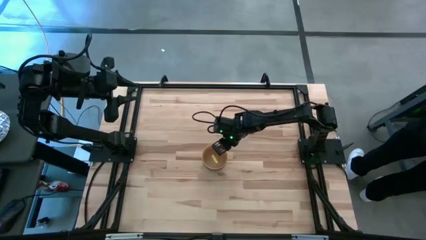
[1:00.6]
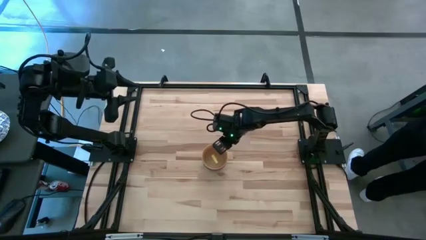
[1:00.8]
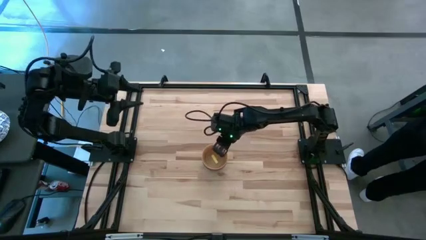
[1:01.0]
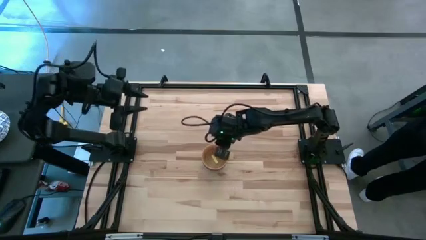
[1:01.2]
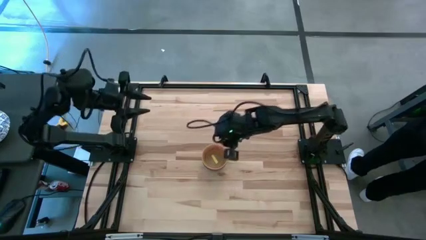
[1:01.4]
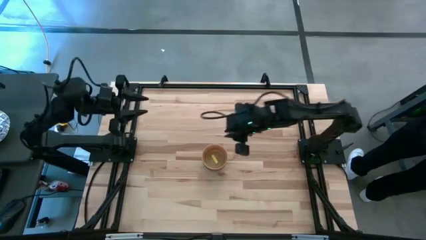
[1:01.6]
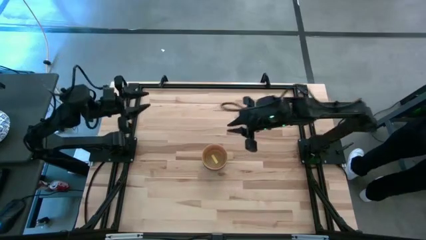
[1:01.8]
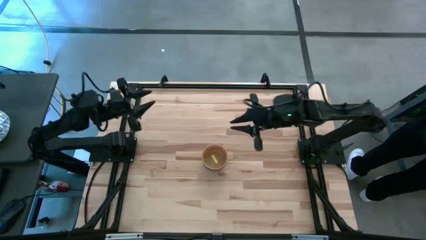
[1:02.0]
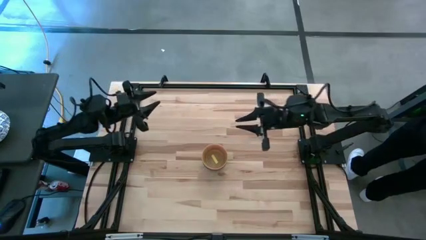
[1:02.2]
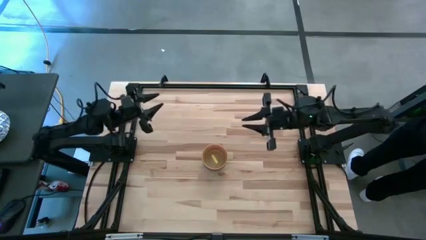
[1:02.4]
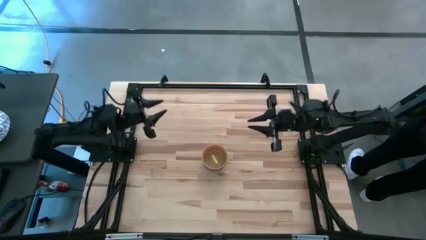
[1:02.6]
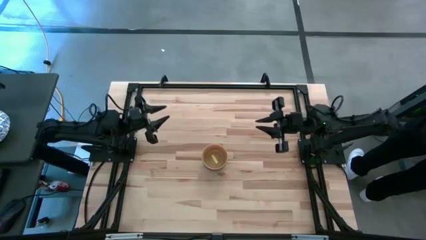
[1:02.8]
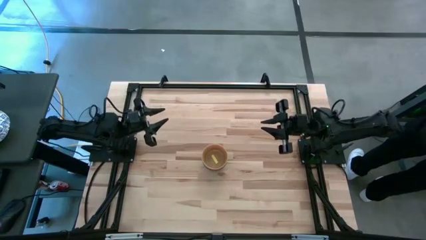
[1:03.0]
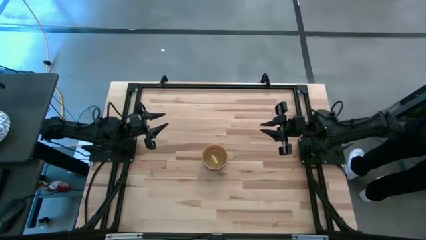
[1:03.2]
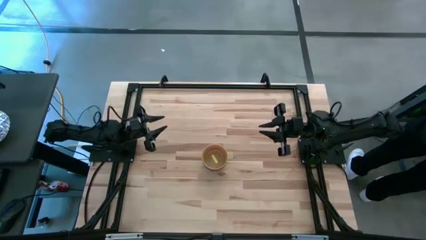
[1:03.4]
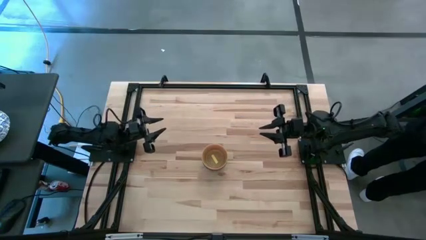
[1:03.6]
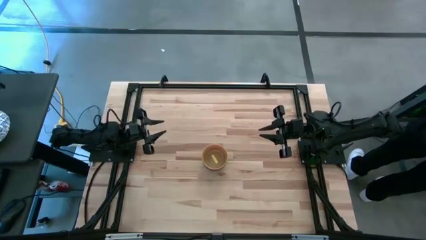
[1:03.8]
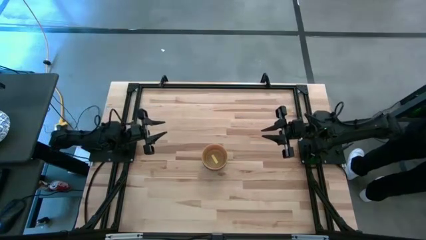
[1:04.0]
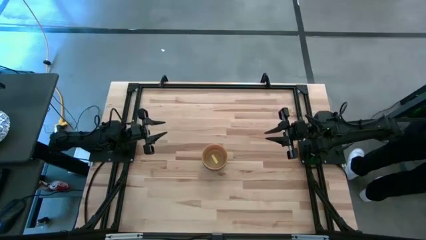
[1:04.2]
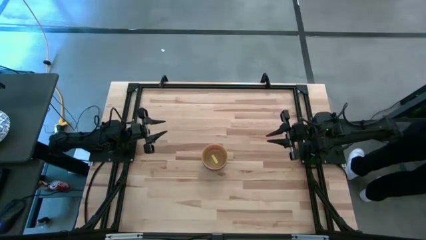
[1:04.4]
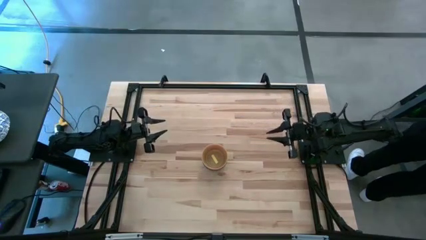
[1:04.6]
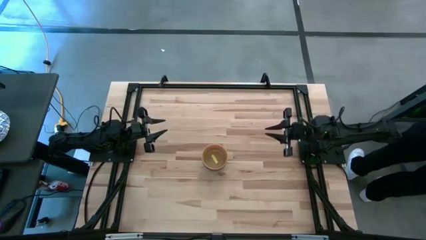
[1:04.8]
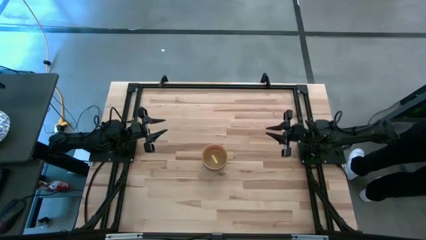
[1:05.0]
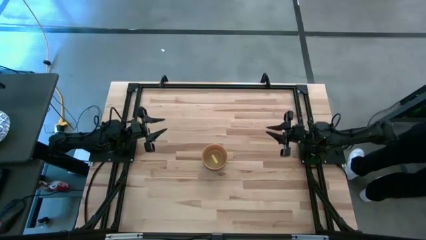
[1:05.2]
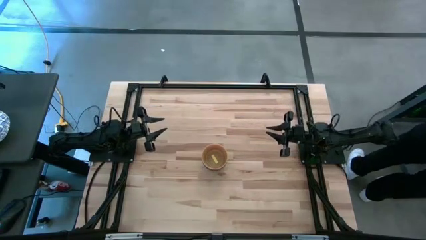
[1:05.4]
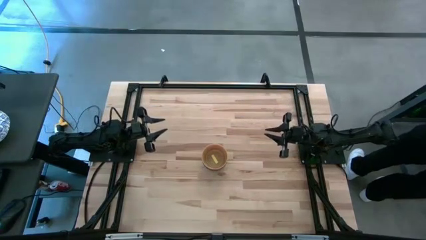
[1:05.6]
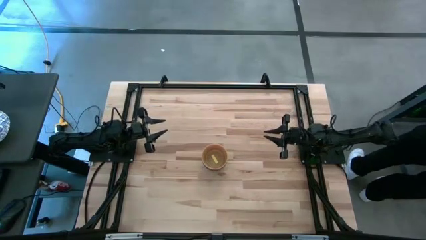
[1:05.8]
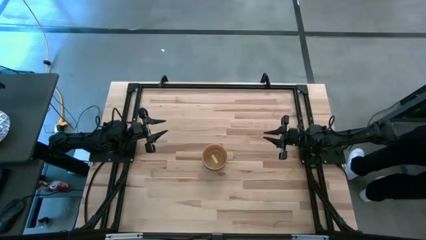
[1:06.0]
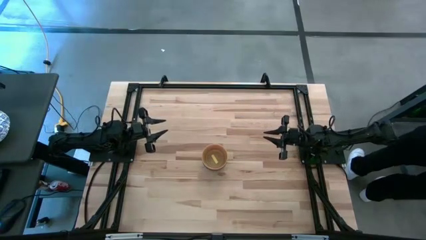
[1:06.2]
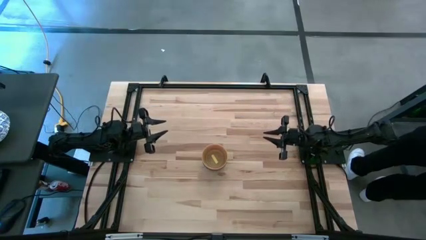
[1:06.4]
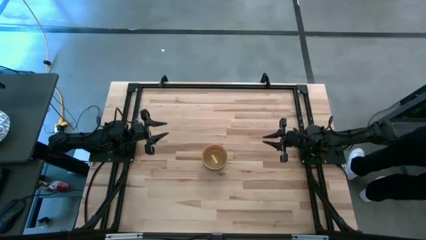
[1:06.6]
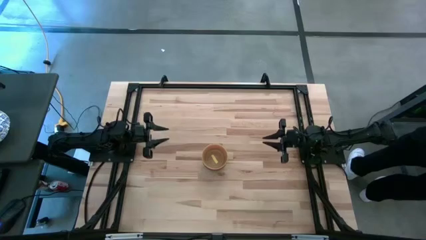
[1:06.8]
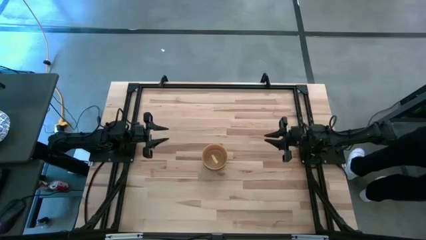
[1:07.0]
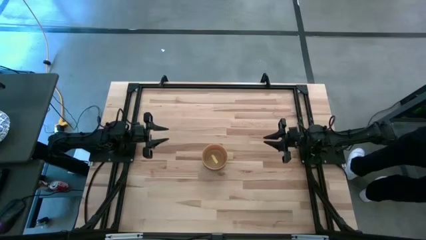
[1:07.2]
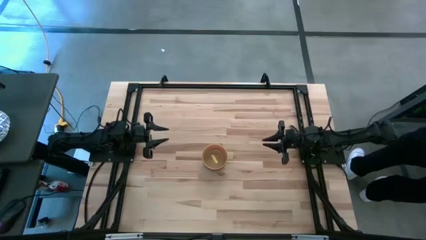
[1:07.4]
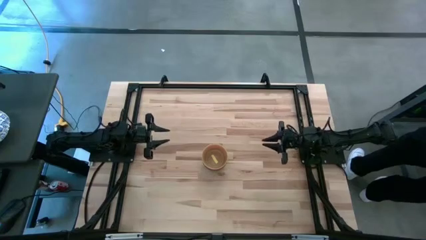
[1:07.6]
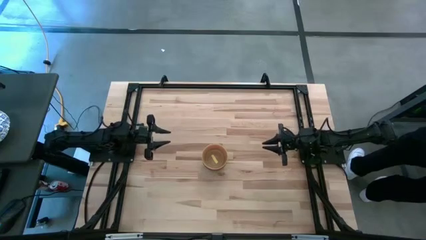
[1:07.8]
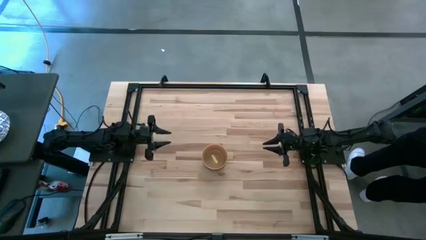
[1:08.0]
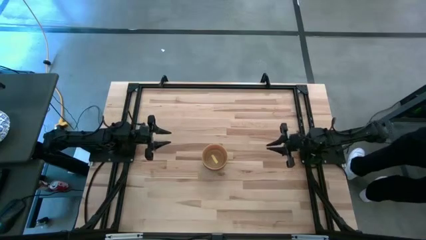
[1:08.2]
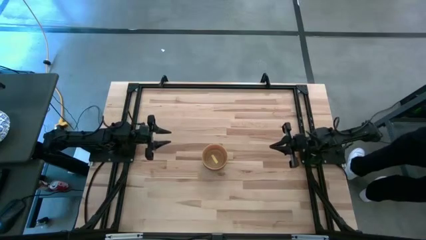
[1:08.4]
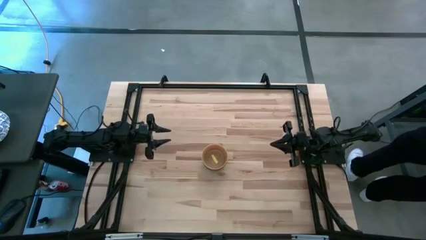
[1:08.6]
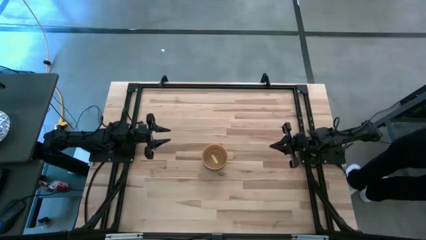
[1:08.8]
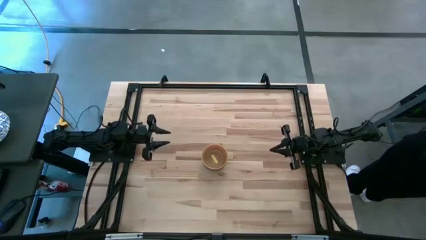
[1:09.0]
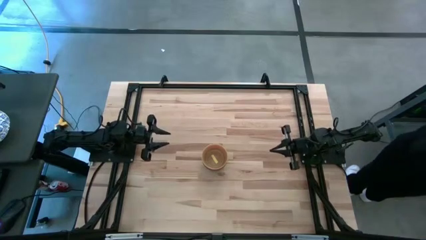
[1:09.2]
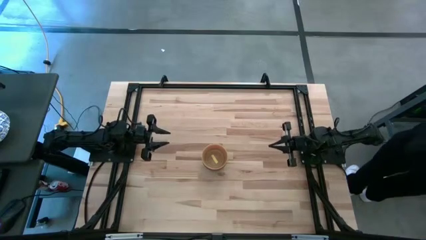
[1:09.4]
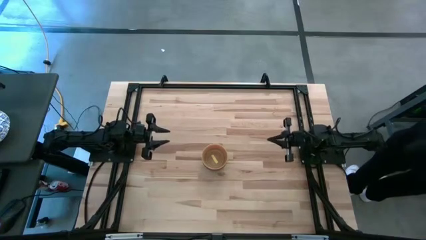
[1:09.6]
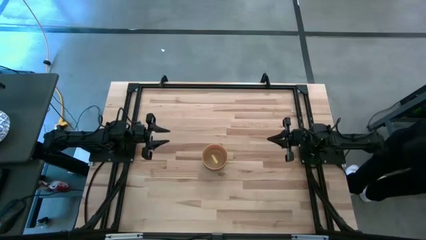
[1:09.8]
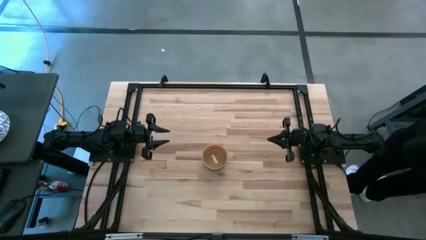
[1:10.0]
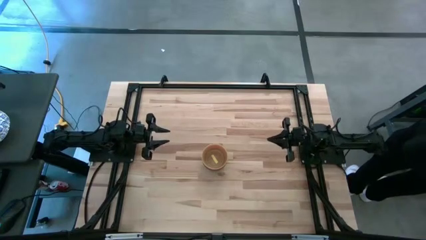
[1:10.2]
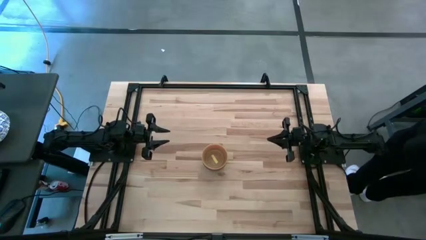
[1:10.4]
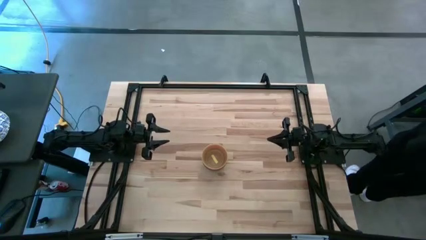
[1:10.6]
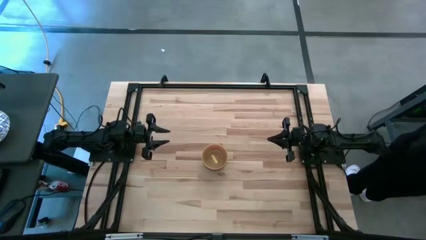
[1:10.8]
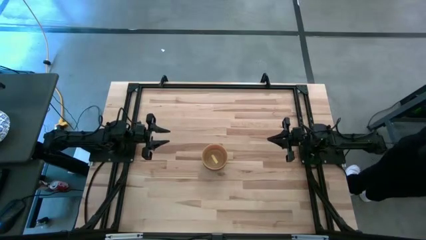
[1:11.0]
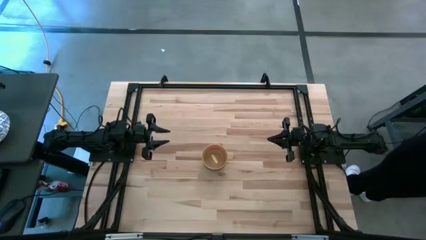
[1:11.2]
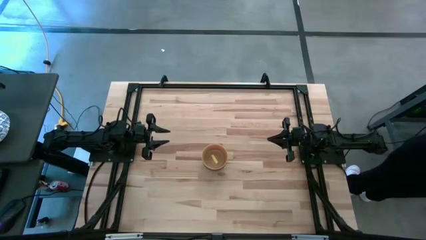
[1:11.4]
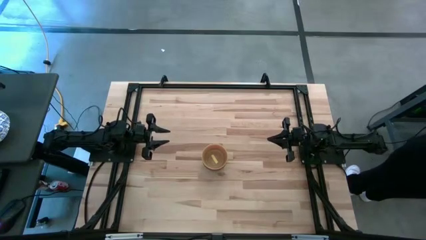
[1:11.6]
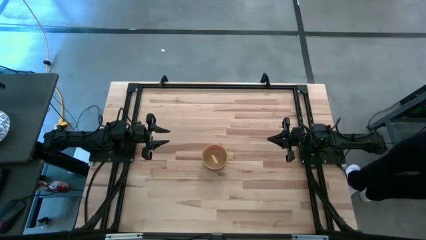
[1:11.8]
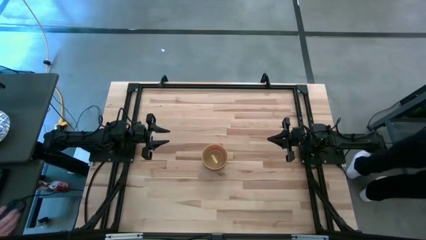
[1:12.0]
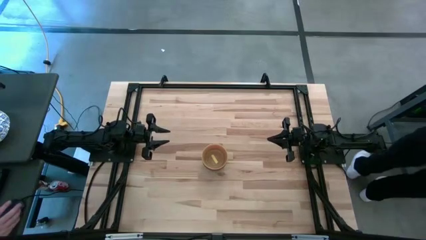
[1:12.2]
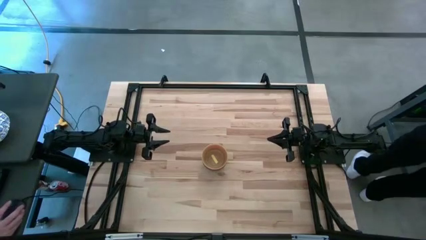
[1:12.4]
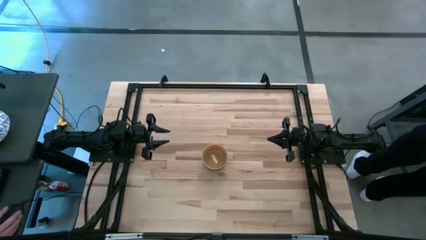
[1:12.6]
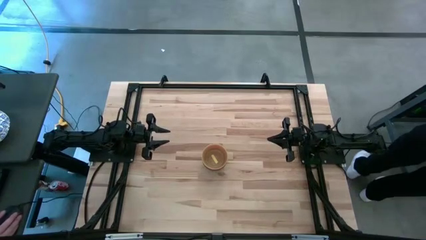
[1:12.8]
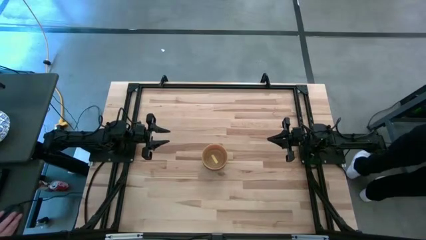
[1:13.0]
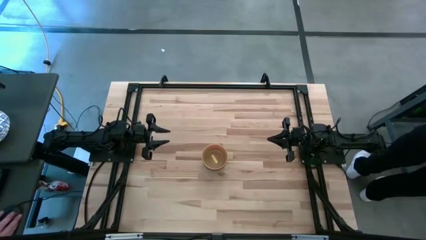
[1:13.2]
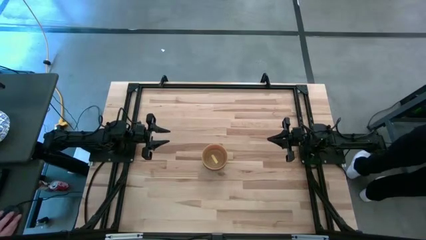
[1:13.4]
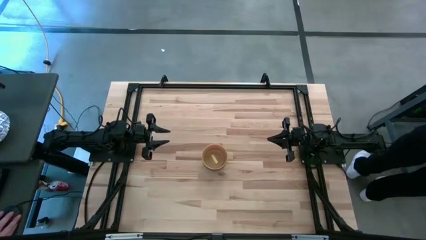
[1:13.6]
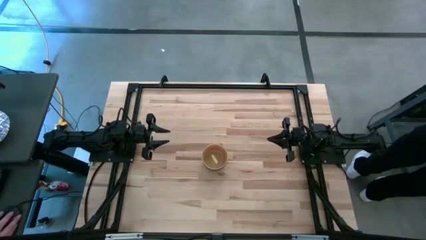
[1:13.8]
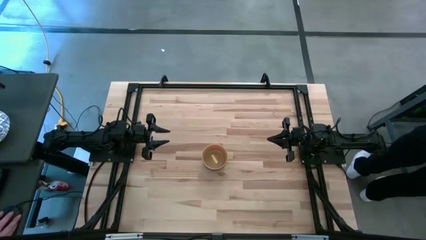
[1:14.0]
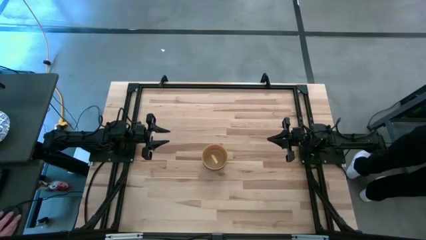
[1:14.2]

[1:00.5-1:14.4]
Task: Nest bowls inside each other
Return to Home Position

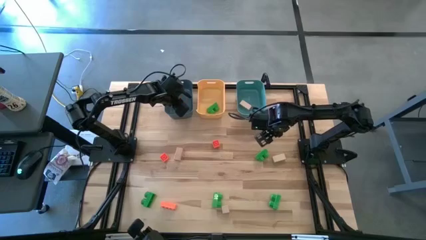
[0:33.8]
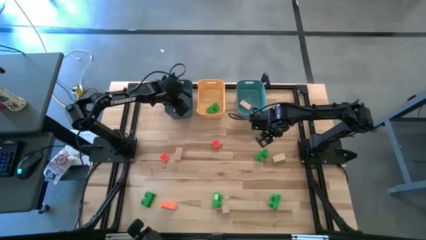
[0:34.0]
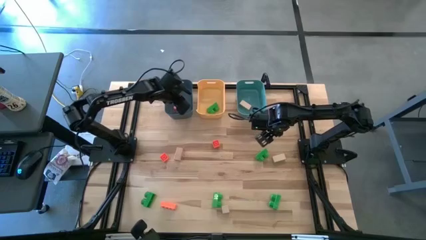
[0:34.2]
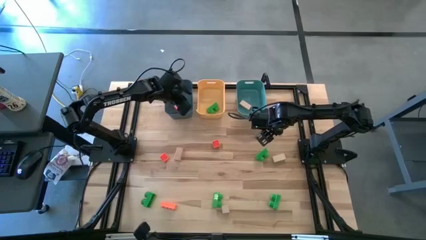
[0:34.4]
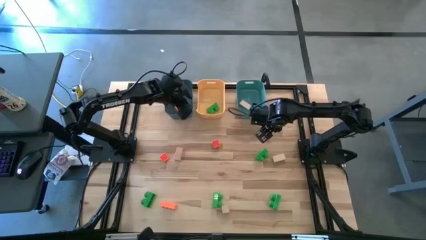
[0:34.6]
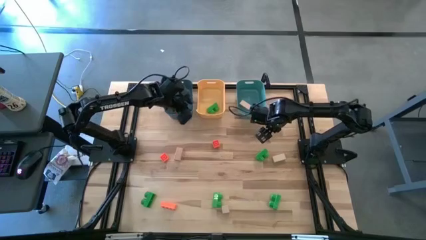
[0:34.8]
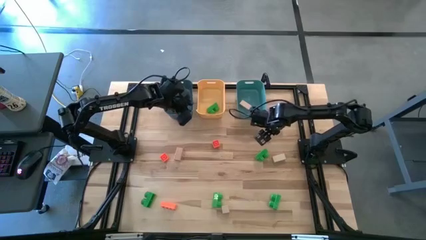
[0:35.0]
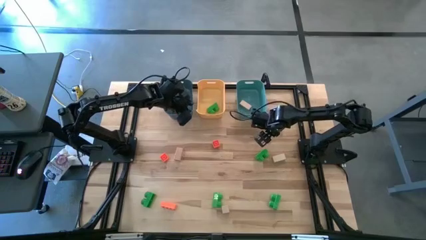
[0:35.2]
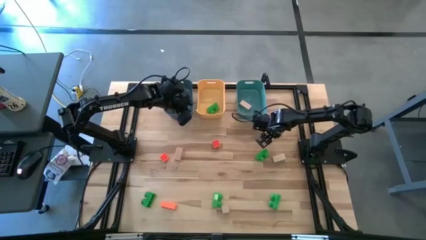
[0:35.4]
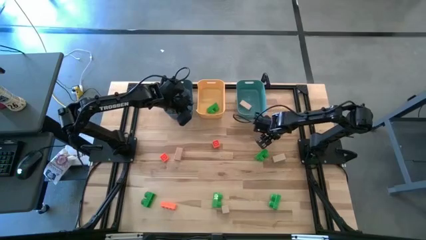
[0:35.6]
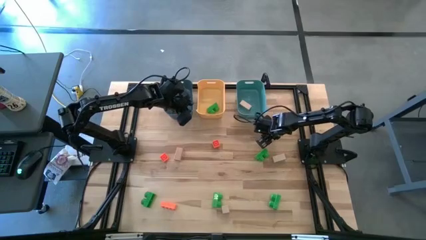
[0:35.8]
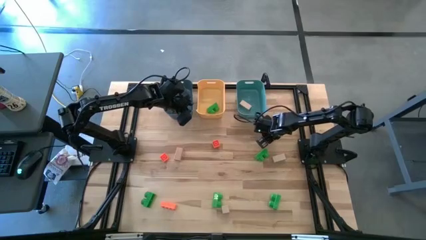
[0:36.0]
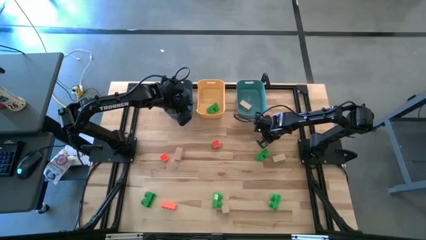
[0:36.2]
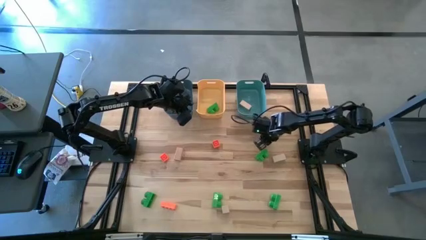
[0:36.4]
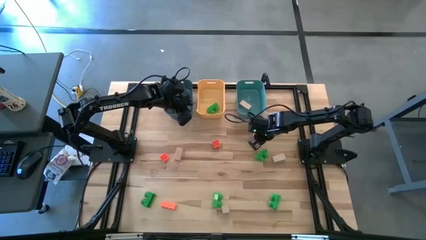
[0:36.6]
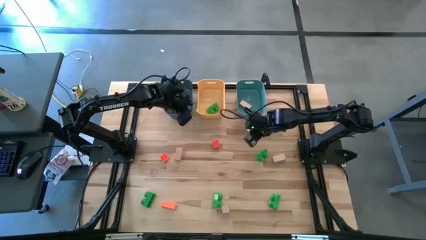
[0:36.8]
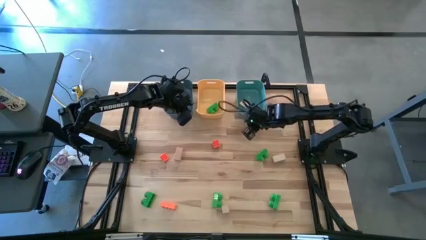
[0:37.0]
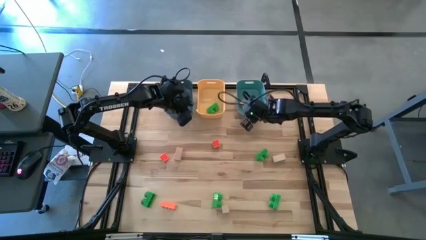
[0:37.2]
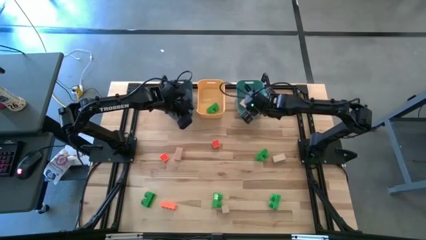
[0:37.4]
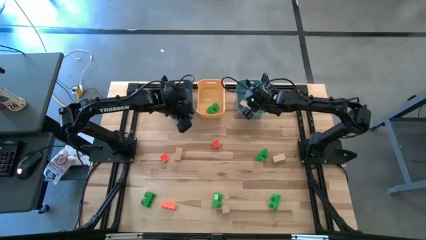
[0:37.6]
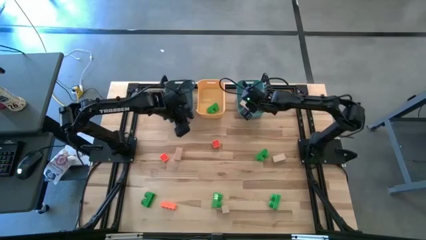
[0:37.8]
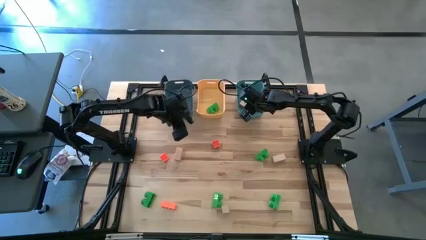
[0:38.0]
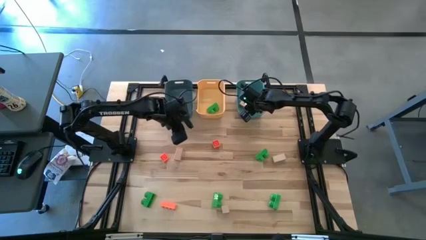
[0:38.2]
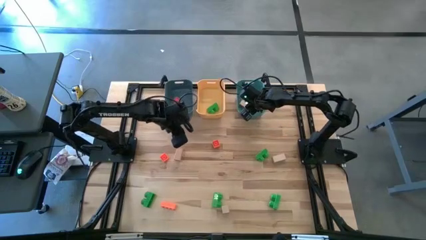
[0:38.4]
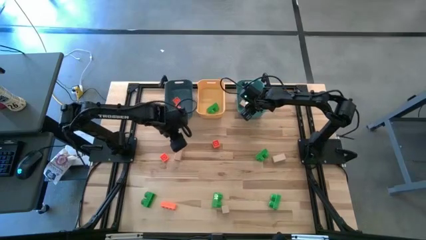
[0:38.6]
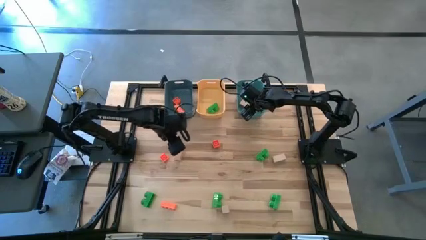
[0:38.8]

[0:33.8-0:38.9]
Task: Sort & place blocks by color
Put the brown block into the green bin
